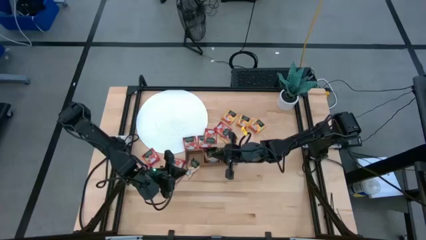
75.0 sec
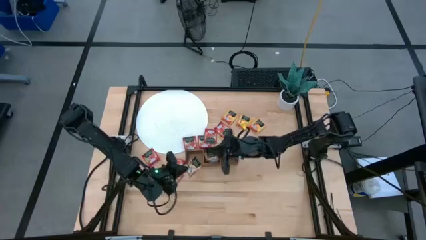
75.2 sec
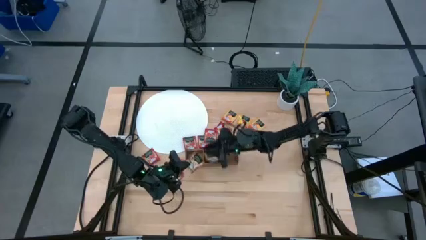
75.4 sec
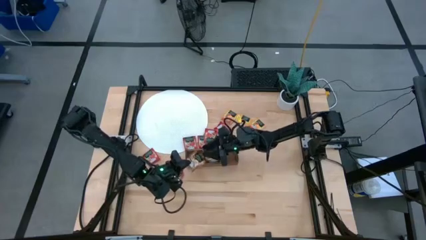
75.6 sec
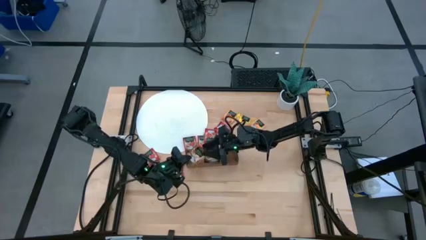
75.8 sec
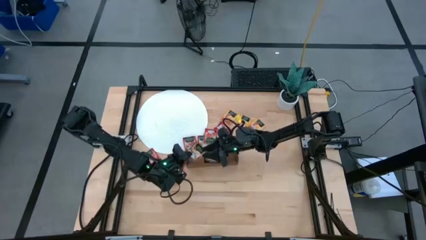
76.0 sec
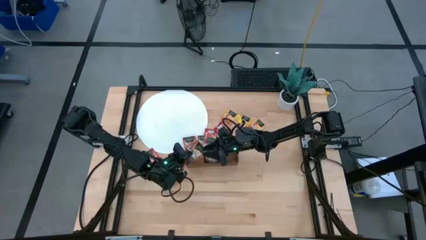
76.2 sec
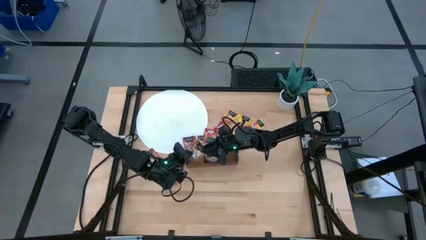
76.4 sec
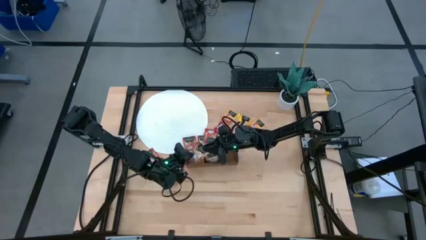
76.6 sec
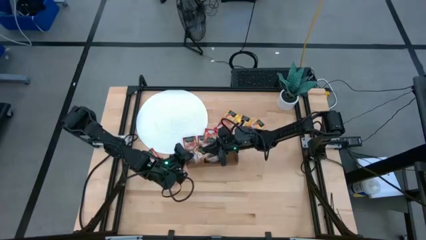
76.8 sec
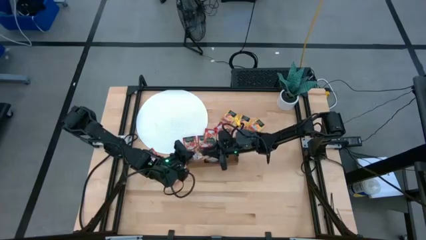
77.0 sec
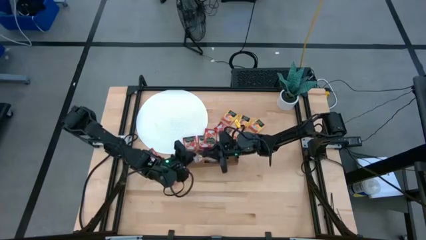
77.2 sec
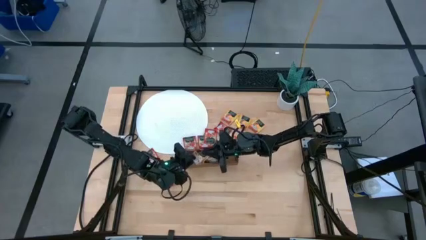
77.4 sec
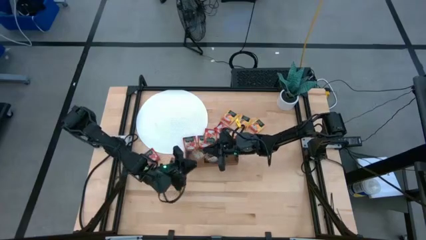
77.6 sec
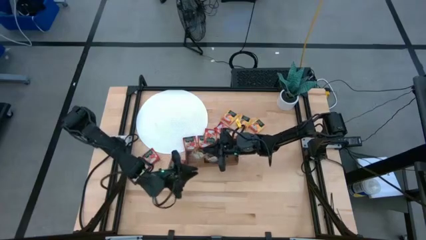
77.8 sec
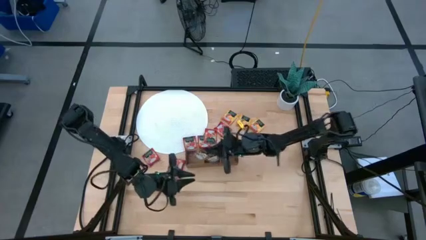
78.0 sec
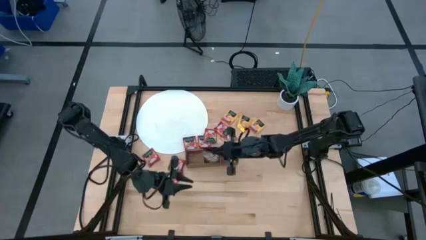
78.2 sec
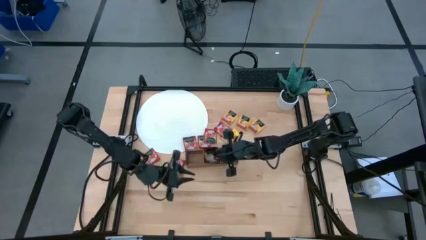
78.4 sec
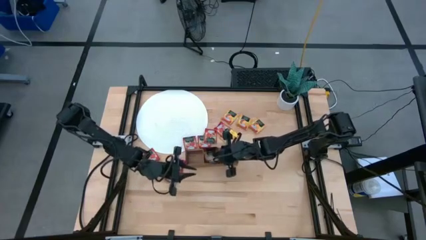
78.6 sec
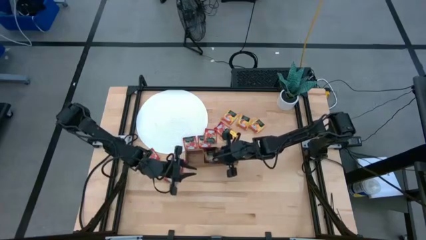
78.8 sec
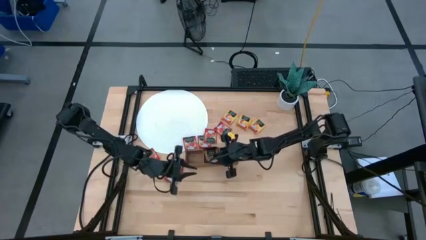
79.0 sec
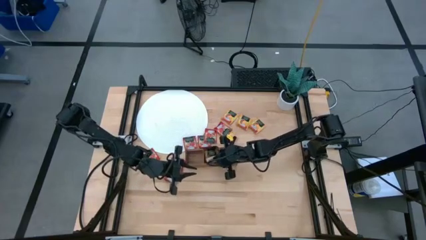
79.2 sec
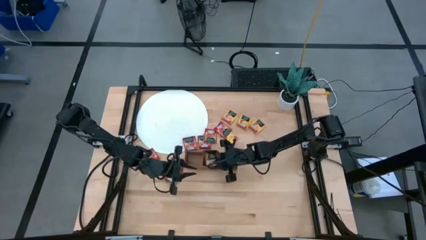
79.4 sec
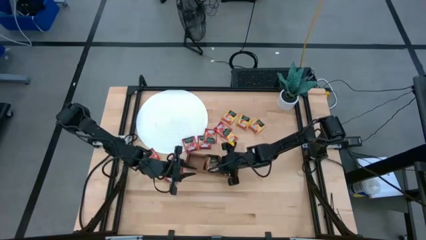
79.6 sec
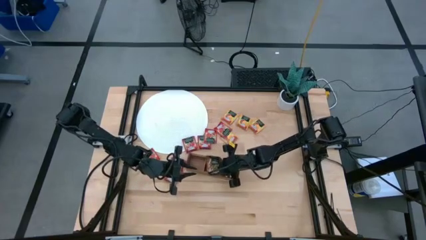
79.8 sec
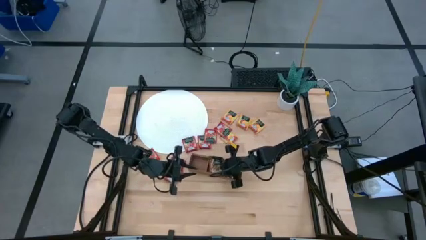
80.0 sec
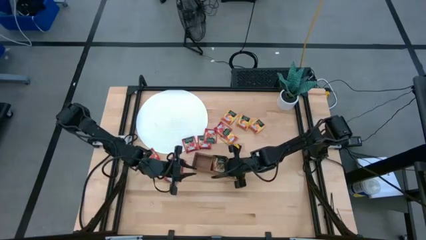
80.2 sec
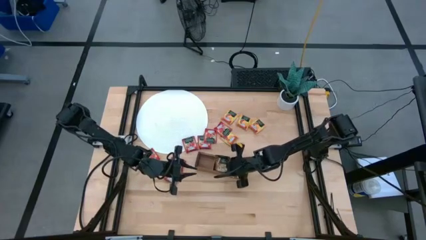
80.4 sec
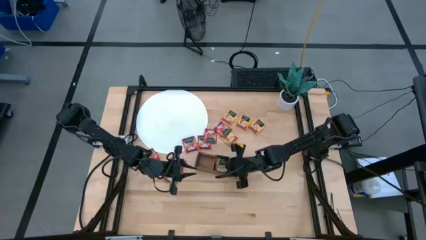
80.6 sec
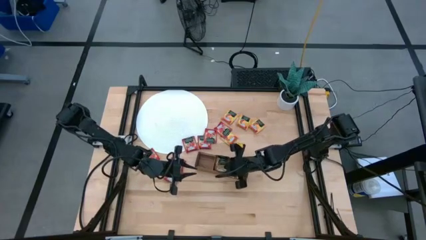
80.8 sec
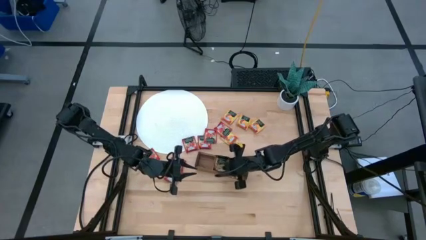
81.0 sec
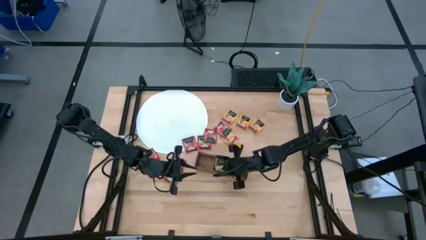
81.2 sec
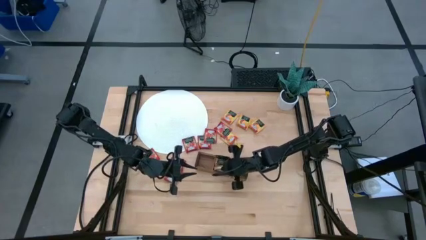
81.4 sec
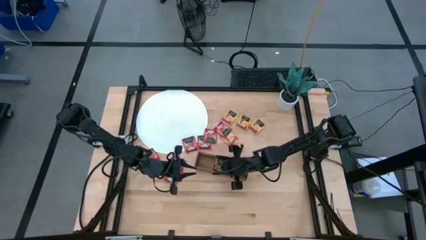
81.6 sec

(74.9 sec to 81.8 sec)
Task: Pick & Place Tea
Put the brown tea bag into the middle section of the wooden organizer

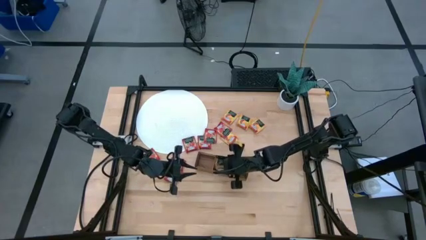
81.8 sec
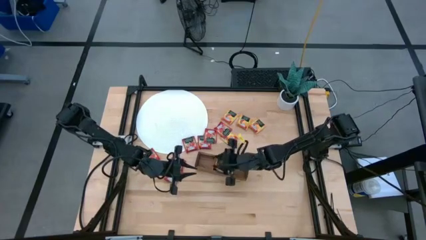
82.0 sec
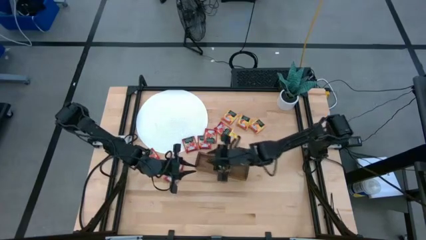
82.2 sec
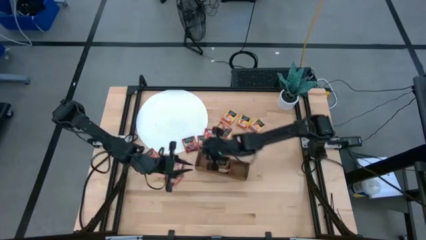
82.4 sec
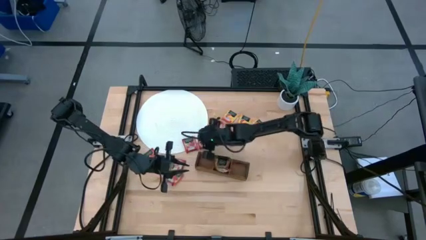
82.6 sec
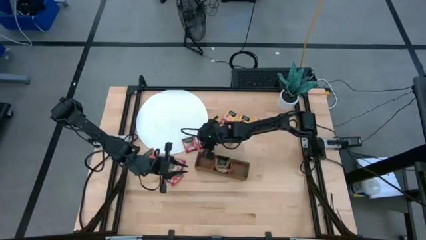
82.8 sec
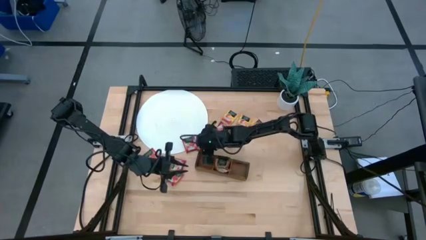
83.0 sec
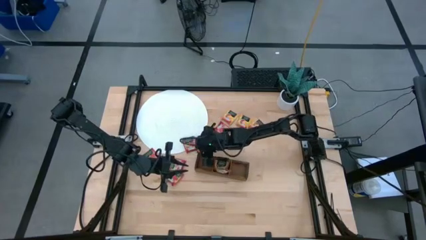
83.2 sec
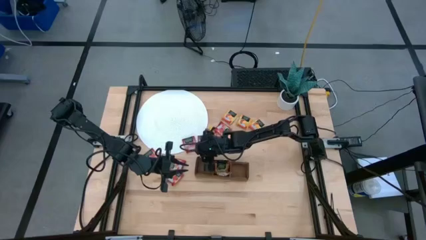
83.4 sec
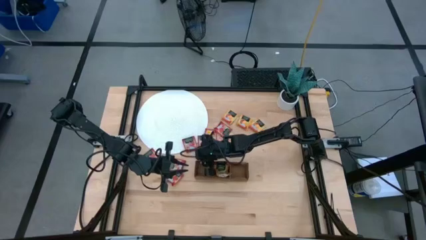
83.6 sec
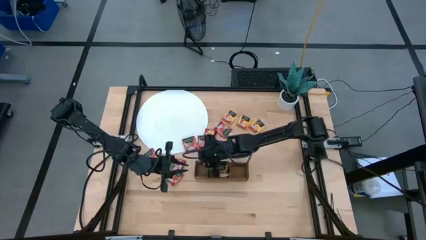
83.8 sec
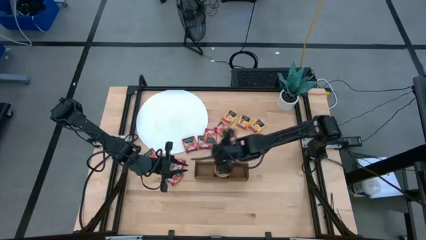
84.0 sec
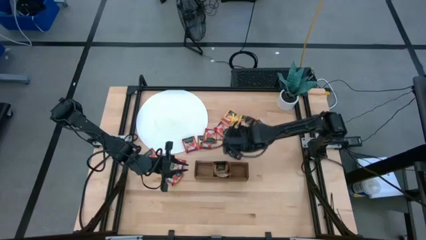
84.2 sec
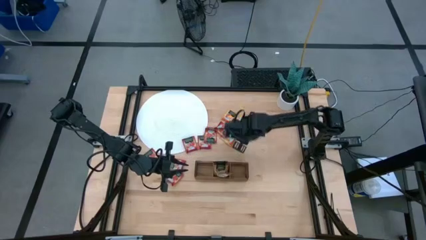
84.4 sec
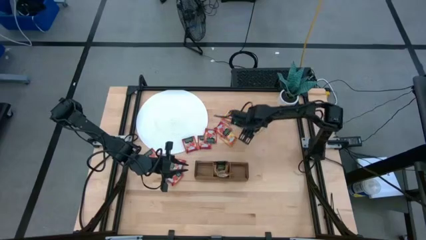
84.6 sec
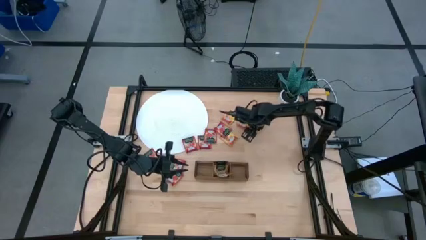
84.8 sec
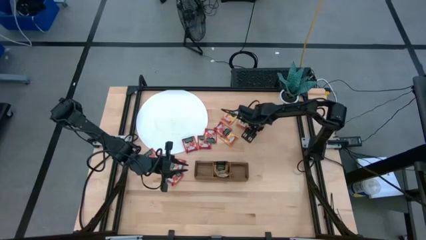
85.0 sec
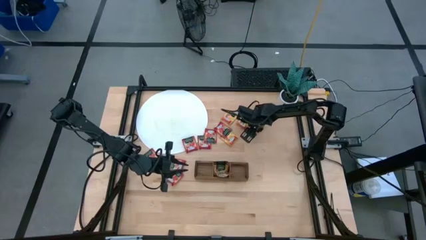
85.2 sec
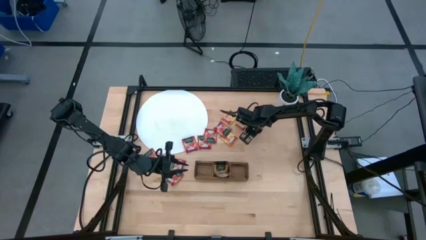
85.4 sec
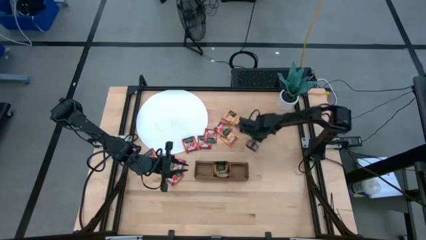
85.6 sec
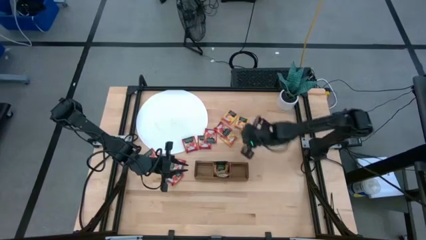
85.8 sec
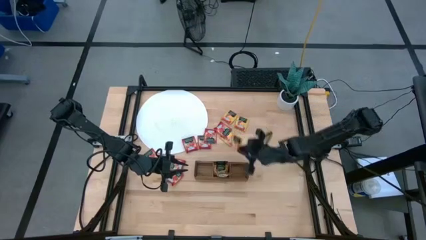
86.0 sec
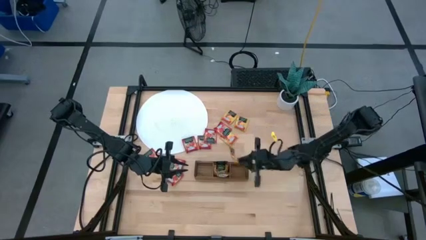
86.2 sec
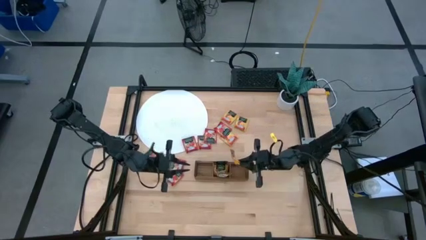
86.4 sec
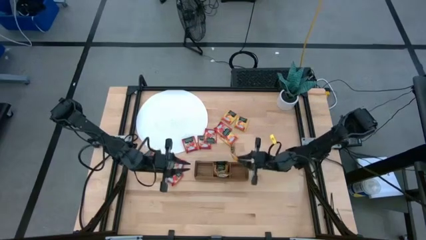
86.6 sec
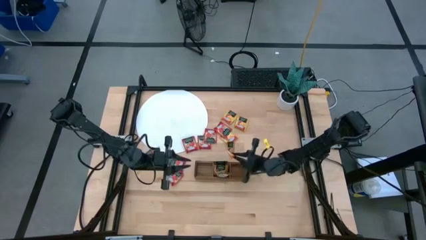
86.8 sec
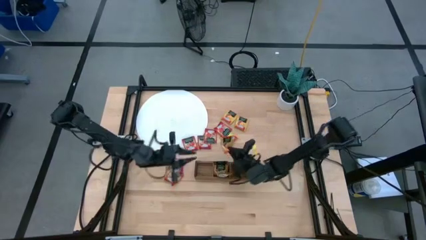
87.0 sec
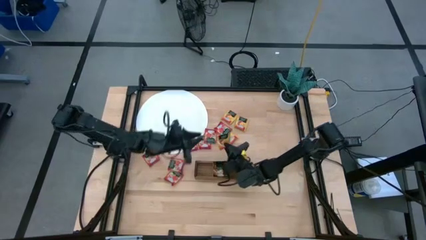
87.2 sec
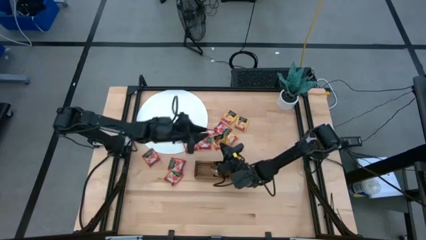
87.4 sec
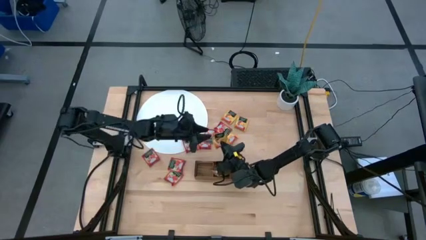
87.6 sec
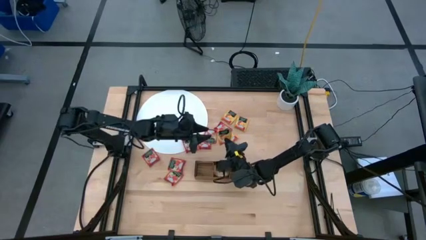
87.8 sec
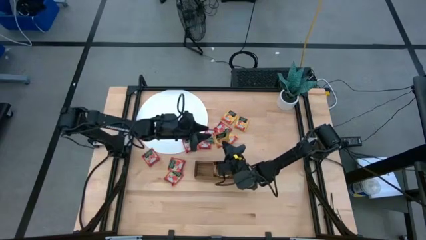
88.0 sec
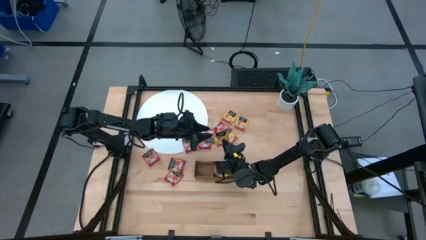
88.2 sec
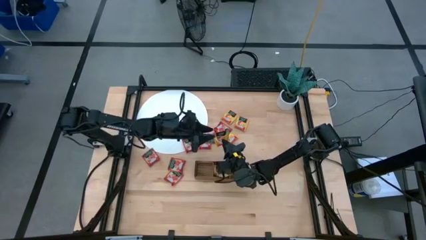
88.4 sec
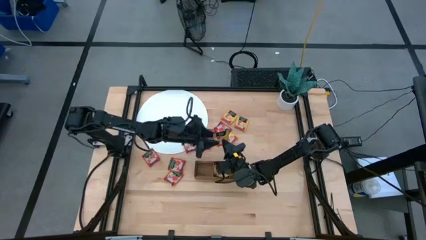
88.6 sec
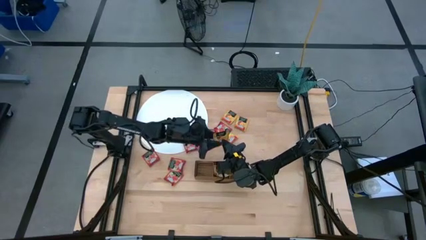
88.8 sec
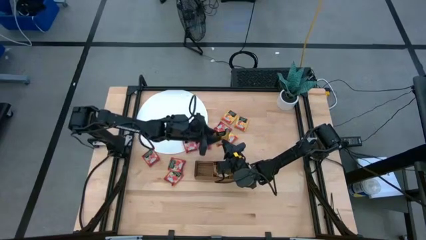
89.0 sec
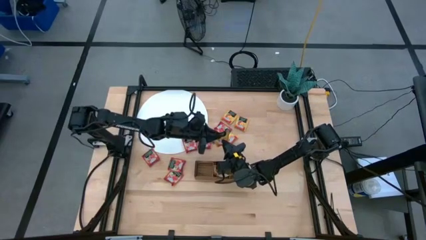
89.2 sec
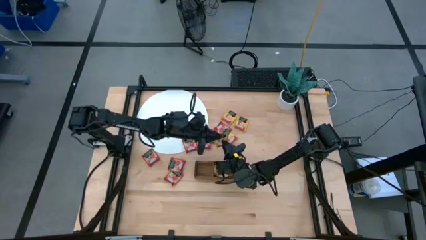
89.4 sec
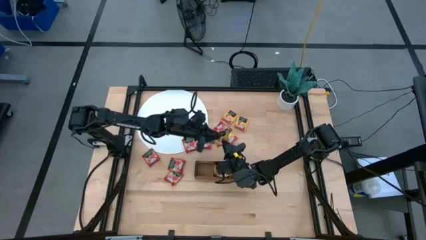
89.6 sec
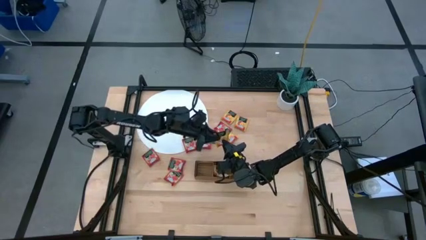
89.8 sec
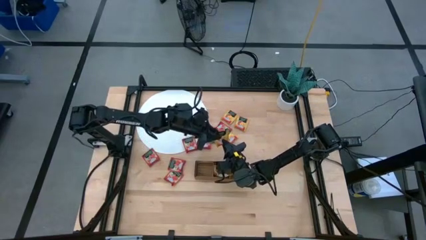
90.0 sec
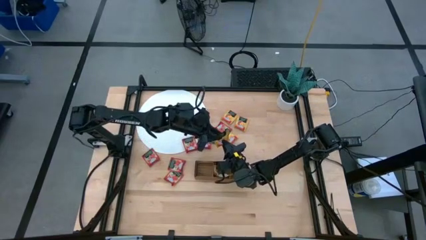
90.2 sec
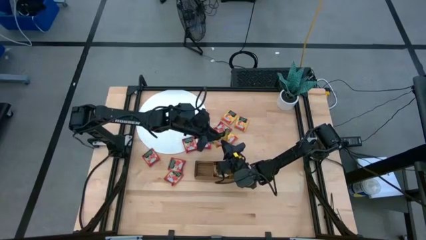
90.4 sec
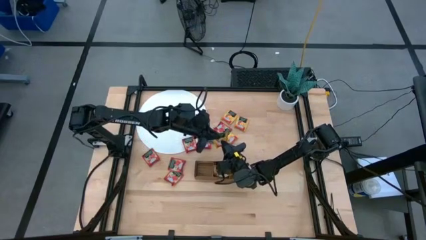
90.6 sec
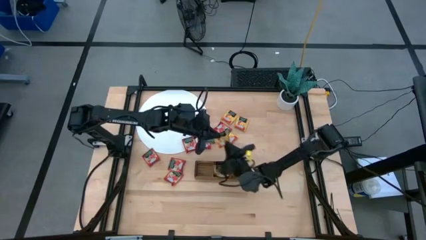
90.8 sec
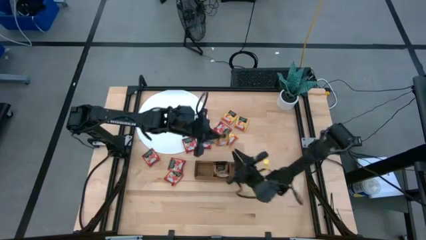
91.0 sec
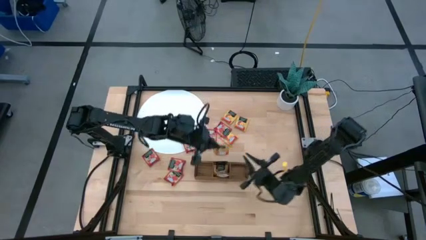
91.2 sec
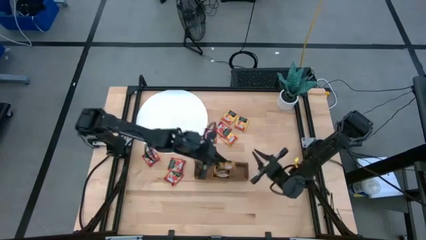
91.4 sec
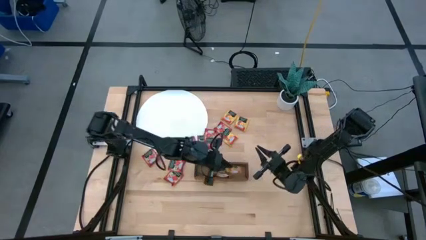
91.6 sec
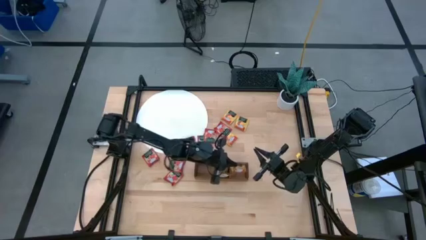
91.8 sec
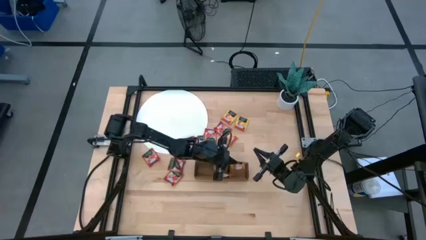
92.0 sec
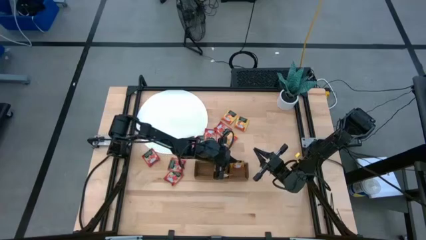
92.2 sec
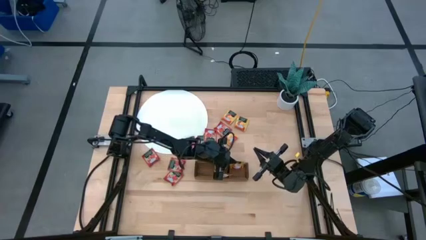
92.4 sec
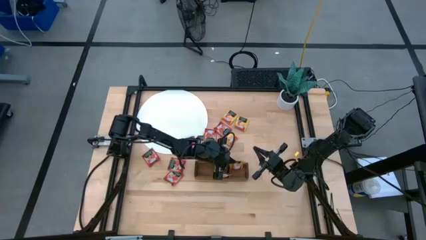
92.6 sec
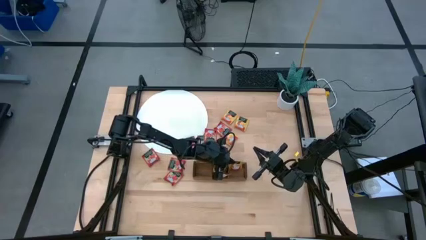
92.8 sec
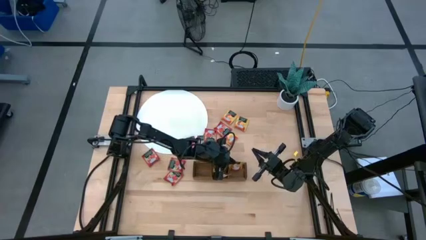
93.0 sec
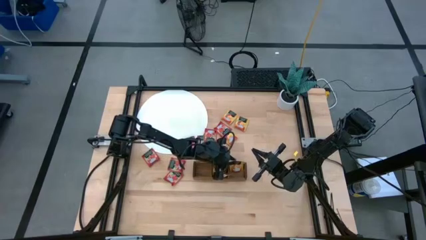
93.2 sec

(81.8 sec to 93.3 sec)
Put the yellow tea bag into the right section of the wooden organizer
